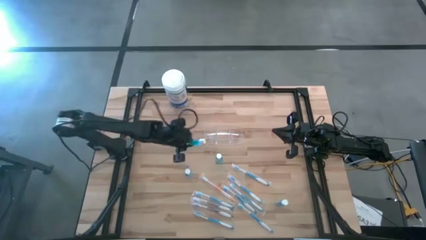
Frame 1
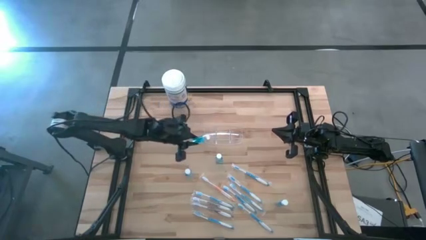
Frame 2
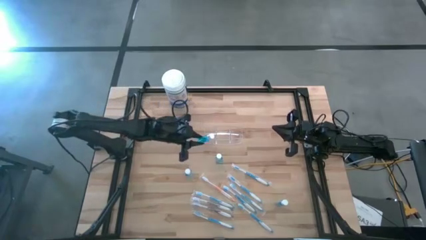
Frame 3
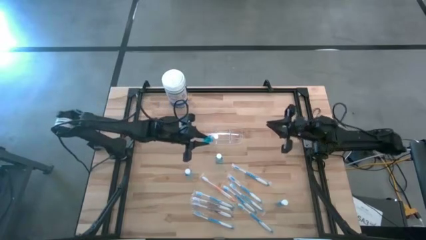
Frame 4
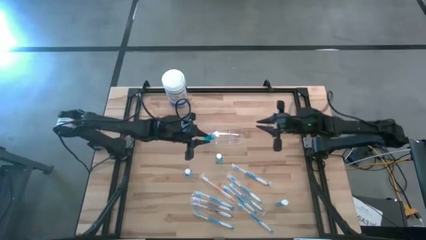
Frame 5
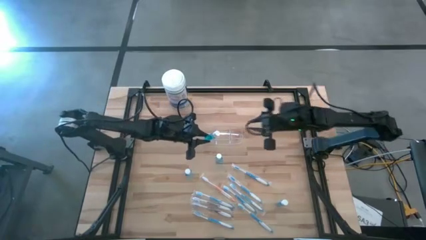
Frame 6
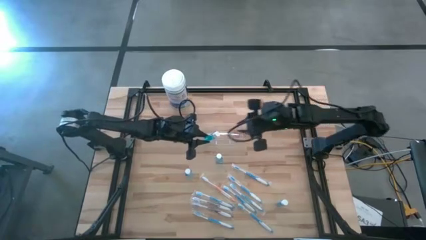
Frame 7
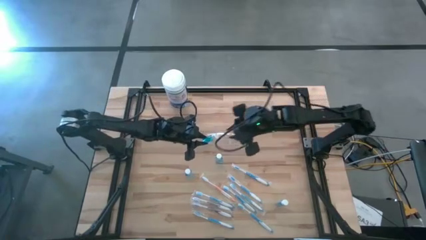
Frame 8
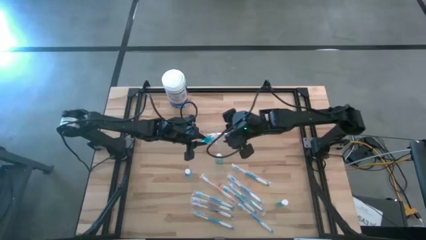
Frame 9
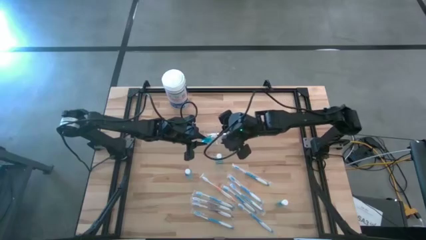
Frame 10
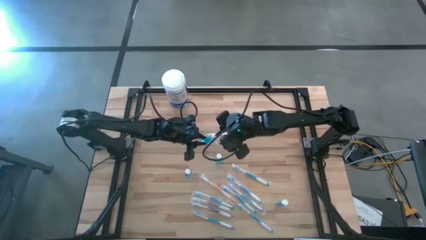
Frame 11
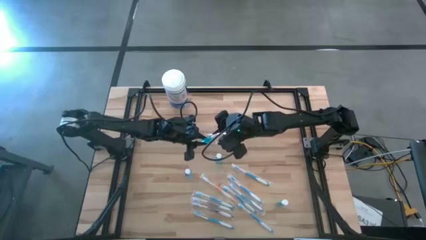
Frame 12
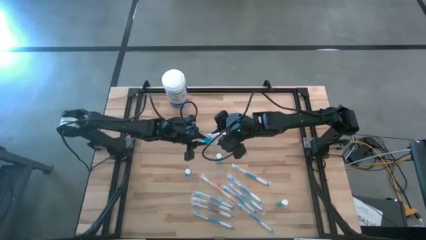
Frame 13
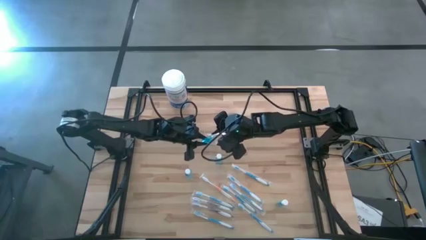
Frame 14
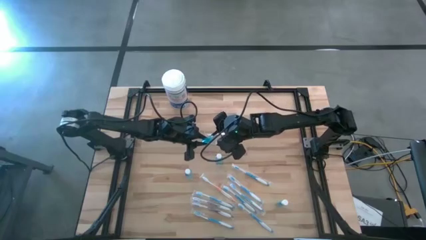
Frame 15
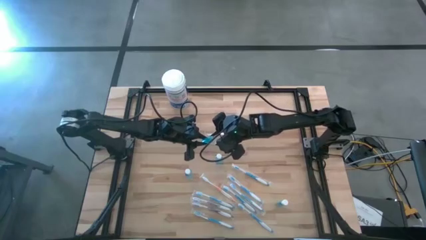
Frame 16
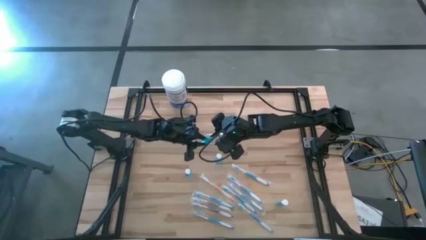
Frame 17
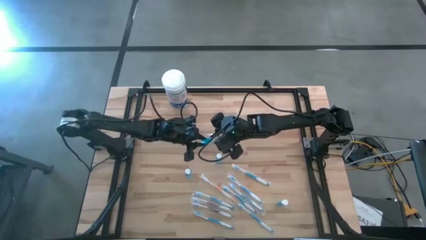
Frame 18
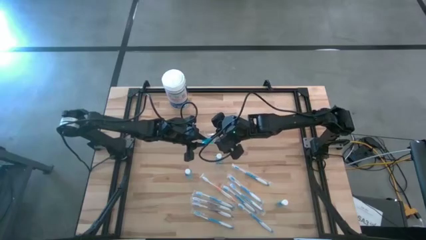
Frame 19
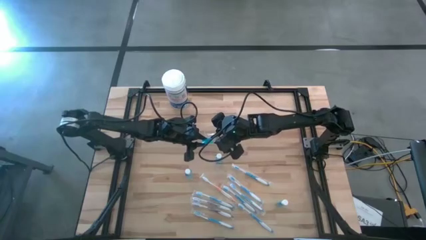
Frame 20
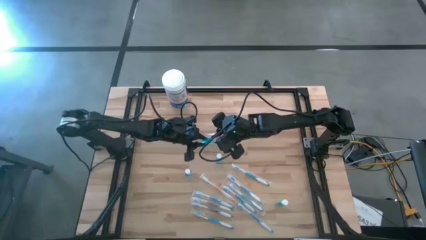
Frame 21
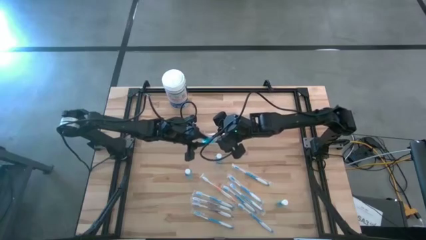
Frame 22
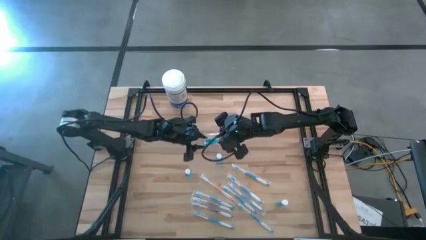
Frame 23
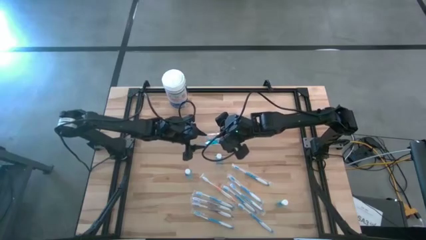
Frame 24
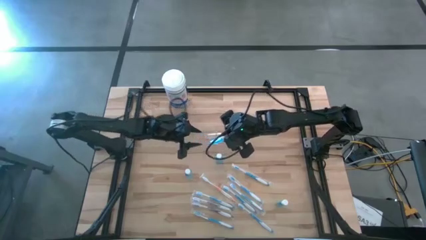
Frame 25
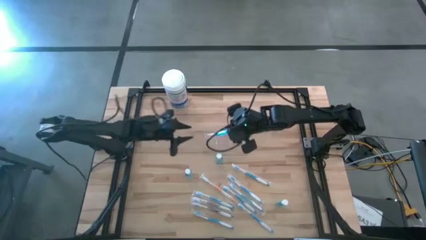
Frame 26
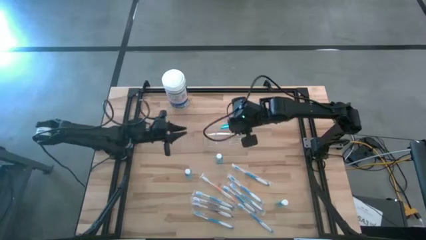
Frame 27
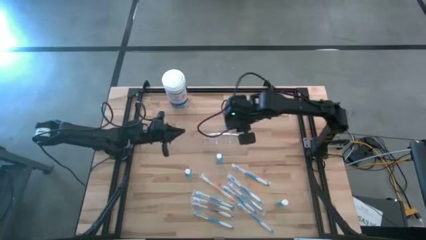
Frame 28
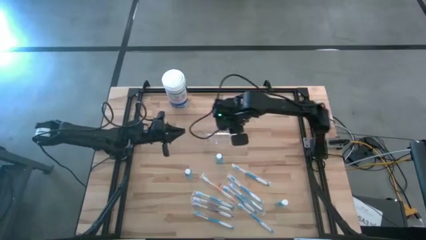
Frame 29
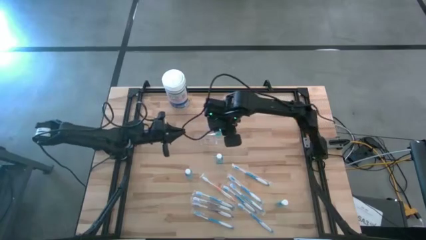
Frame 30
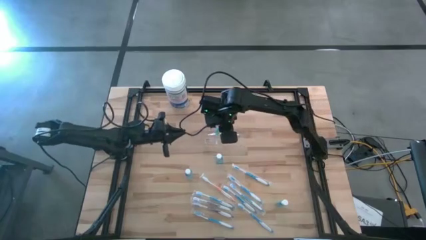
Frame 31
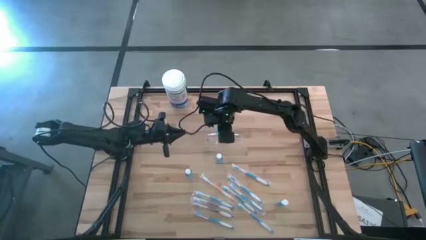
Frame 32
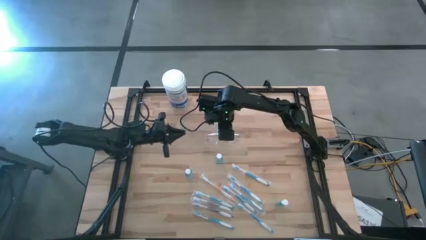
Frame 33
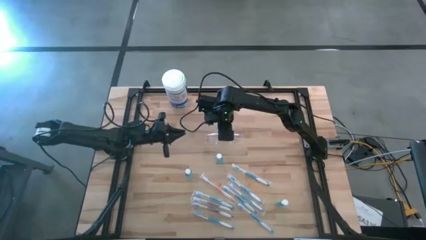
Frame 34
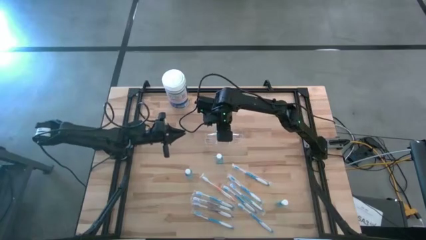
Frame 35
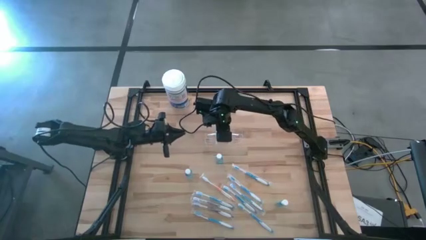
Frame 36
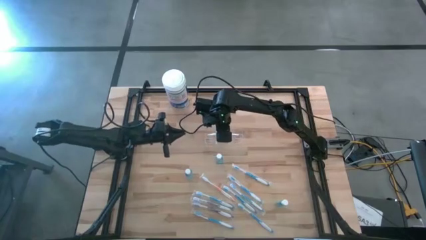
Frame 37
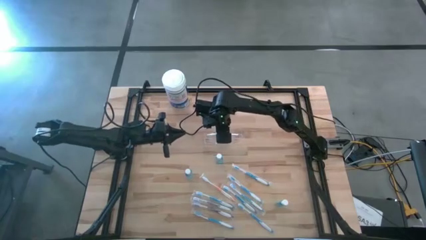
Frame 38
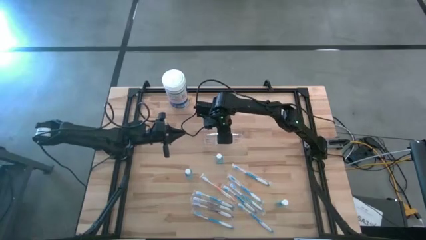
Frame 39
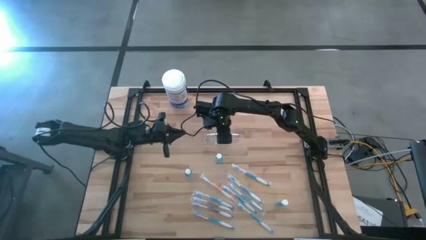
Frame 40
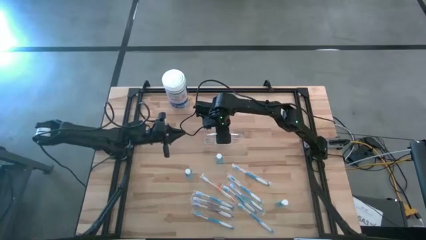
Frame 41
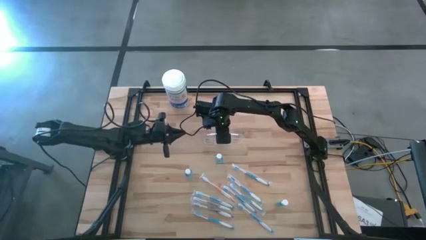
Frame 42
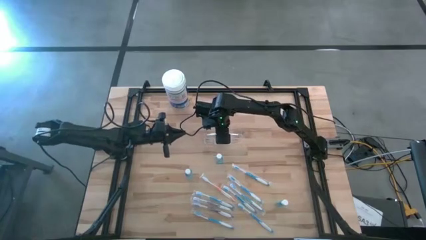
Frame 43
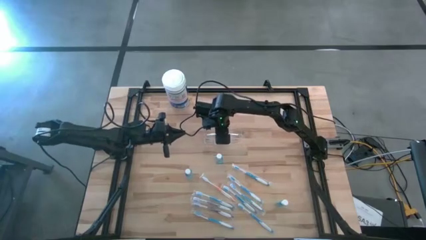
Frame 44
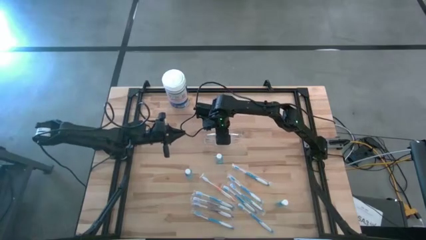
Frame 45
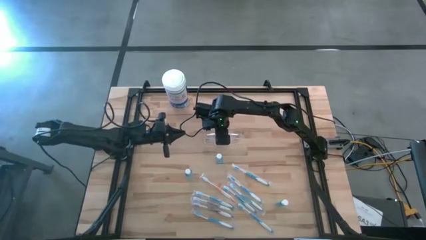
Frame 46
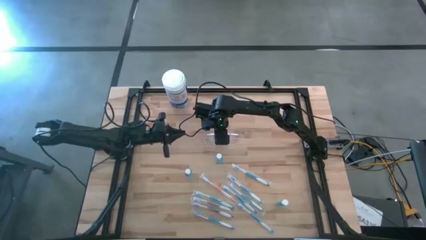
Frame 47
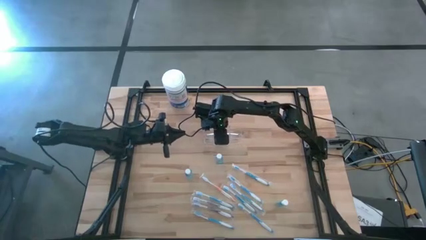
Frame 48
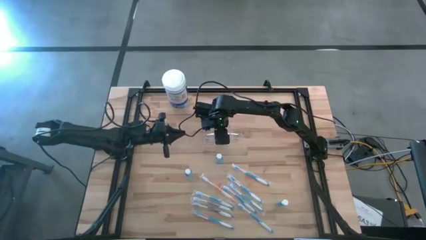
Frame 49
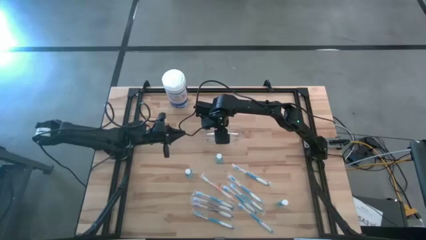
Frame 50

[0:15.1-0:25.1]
Task: Pick & Place toothbrushing station
Put the blue mouthwash in the transparent organizer

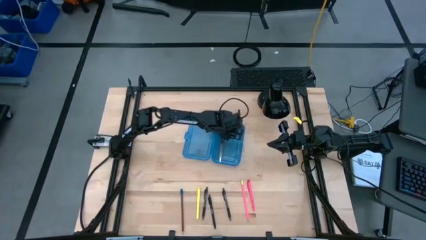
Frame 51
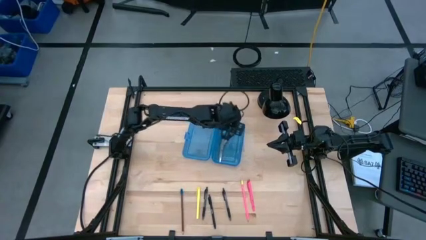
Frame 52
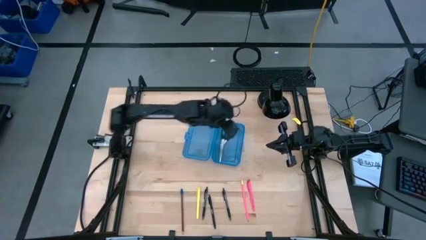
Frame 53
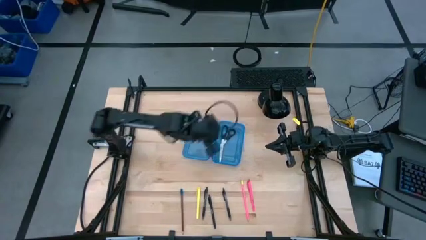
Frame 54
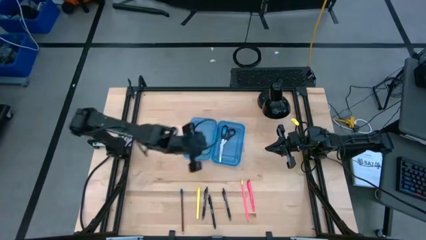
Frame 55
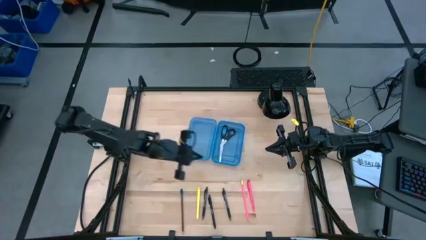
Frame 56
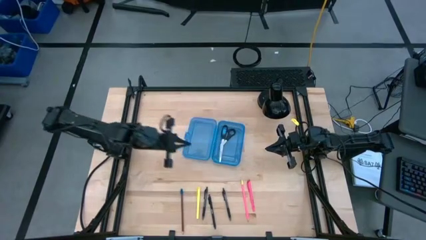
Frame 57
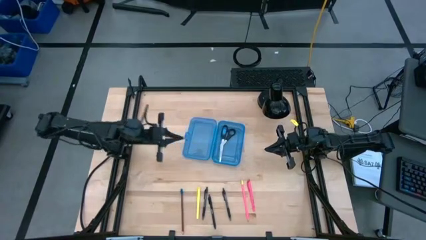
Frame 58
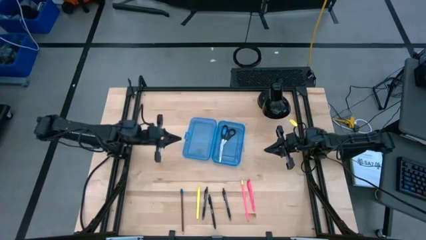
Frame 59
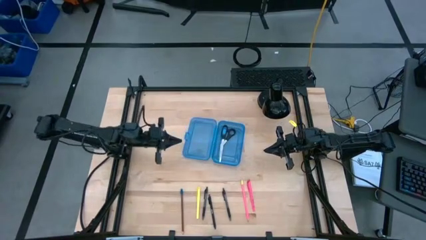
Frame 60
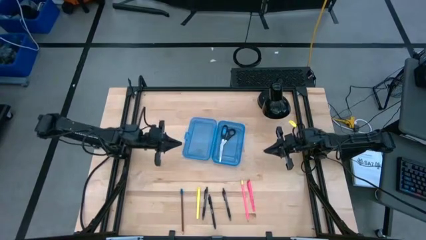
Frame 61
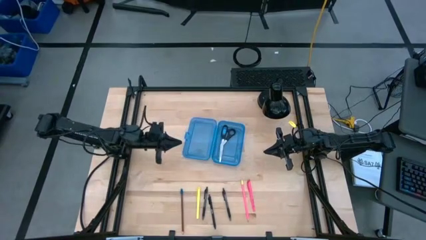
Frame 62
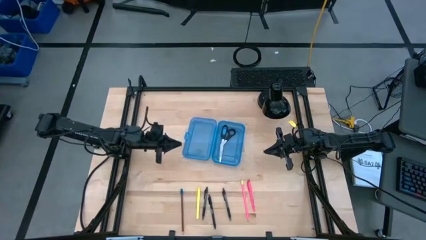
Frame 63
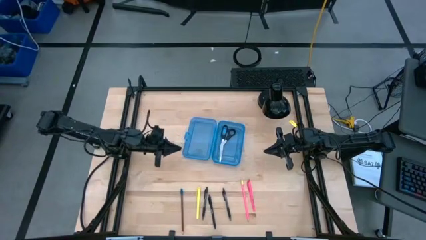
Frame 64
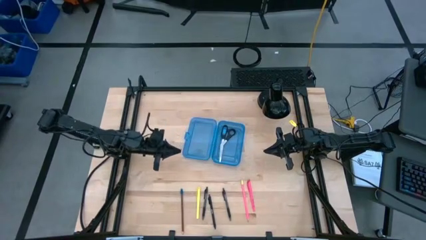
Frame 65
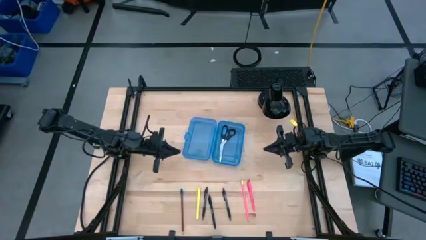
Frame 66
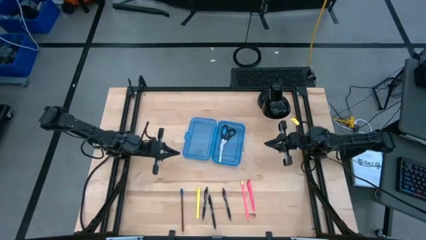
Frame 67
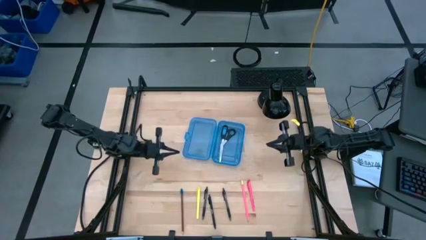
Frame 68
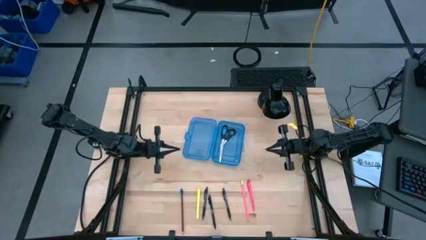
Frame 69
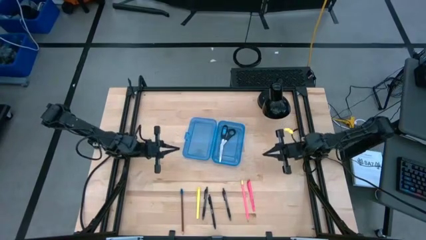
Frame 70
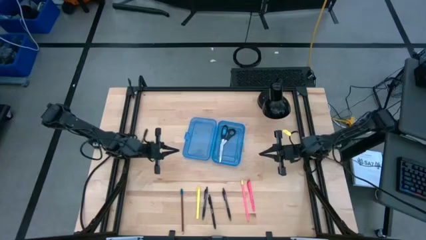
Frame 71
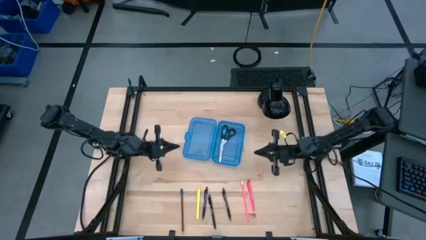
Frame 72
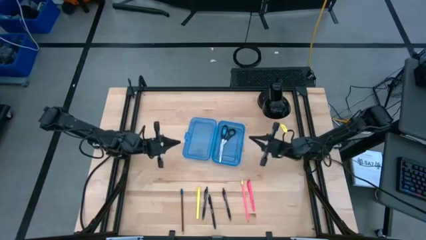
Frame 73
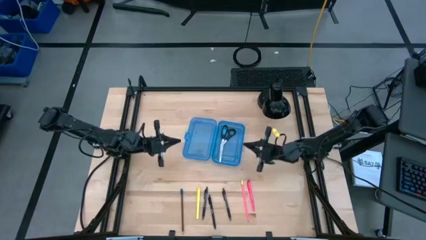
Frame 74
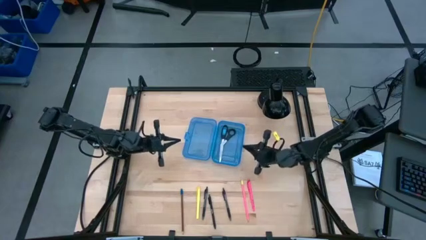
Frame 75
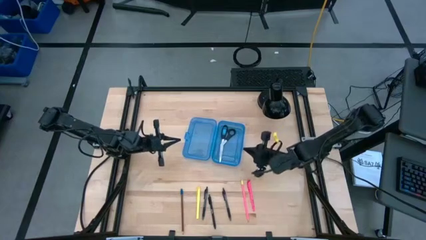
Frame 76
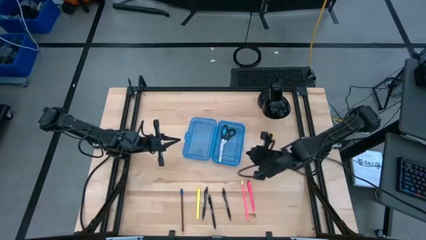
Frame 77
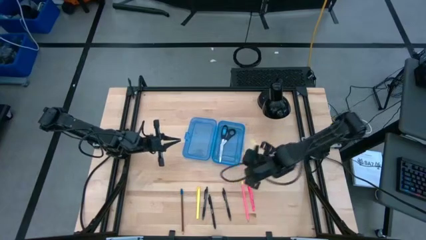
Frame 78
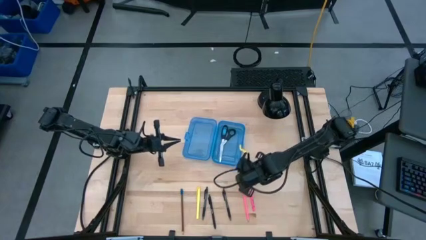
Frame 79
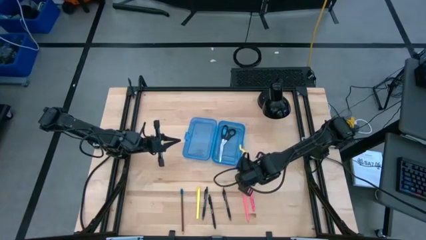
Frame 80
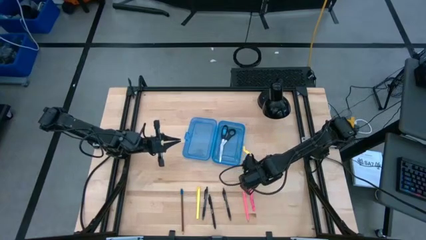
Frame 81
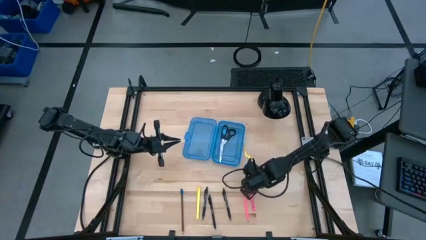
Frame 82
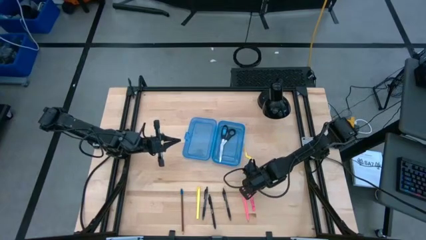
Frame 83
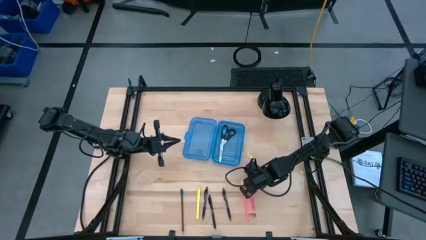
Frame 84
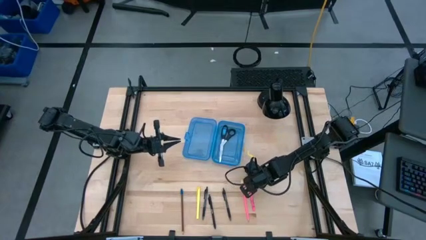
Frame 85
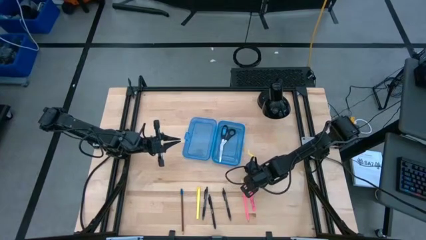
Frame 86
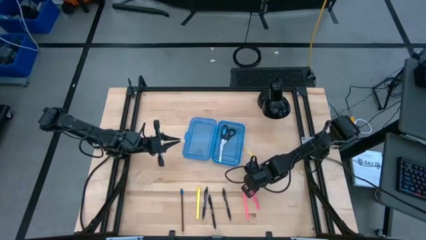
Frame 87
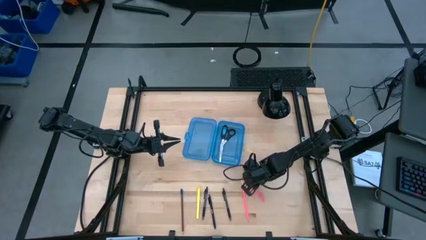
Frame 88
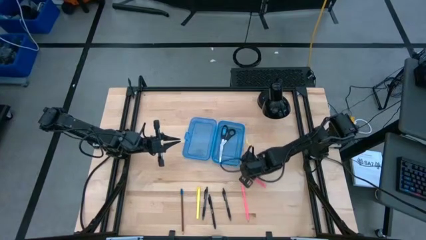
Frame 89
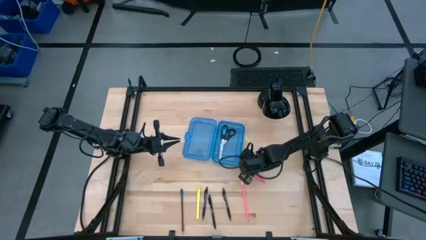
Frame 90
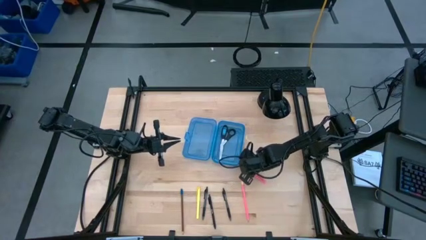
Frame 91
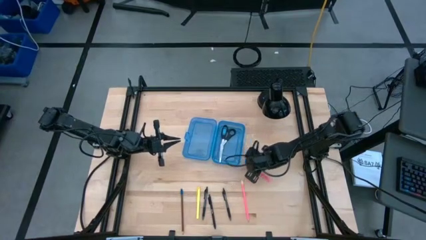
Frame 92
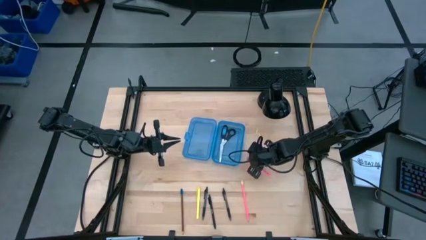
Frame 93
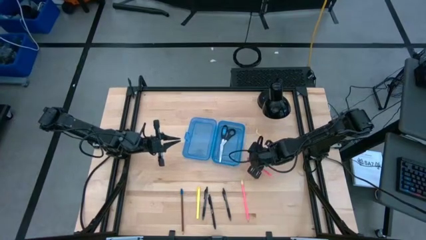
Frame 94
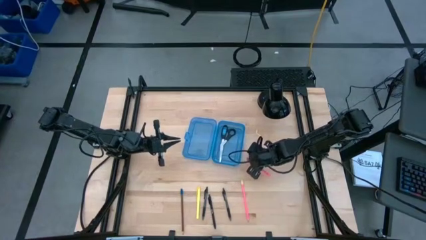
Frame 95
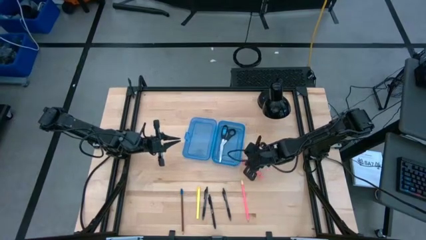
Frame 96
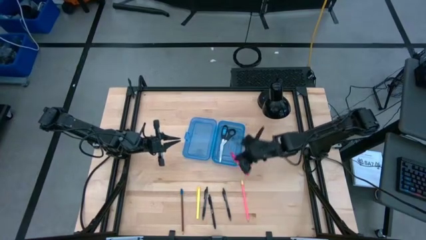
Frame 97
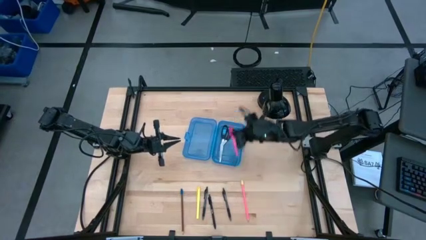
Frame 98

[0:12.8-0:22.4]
Task: Pick & place school supplies into a supply box
Put the pink pen into the supply box
